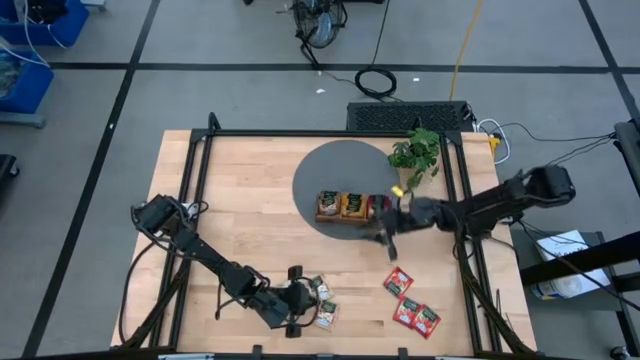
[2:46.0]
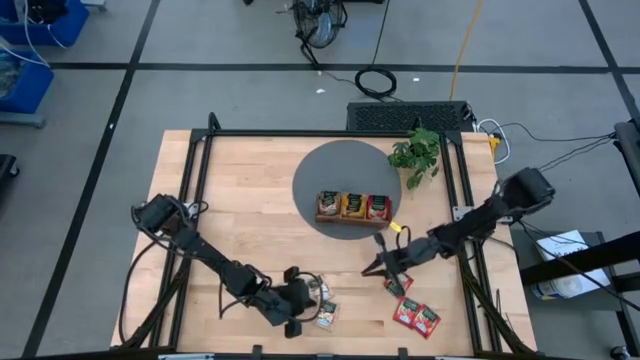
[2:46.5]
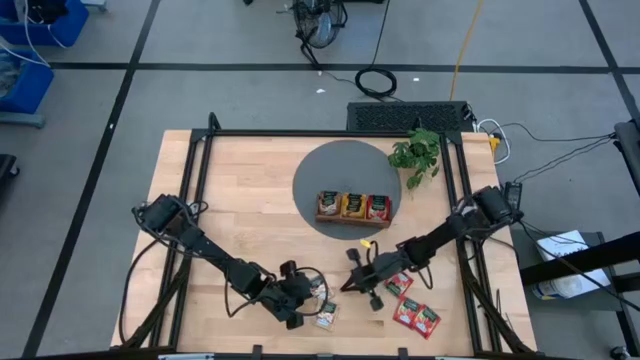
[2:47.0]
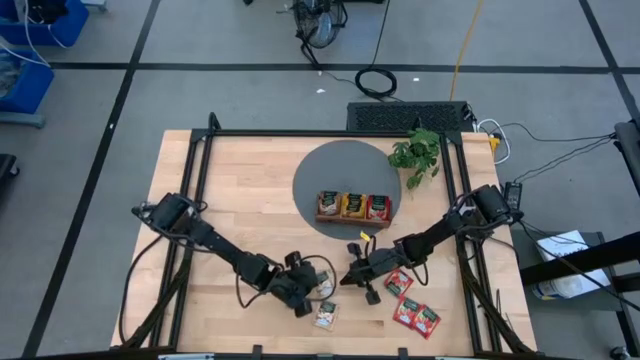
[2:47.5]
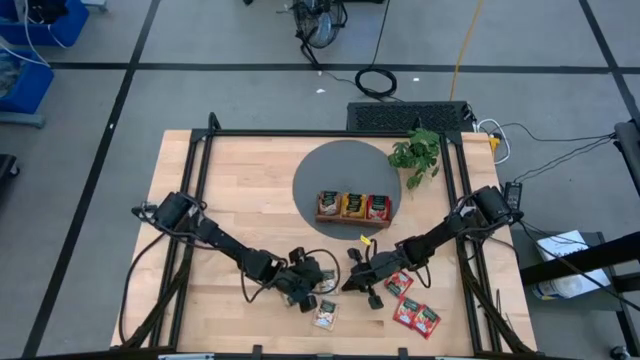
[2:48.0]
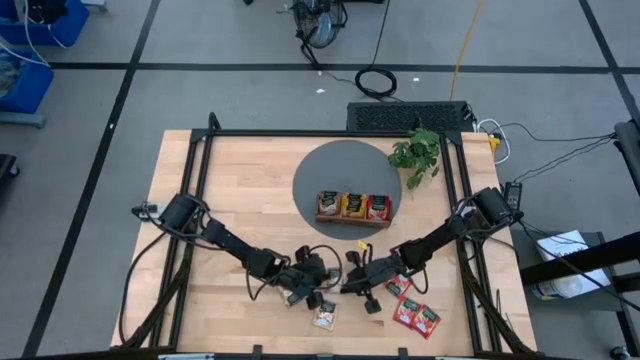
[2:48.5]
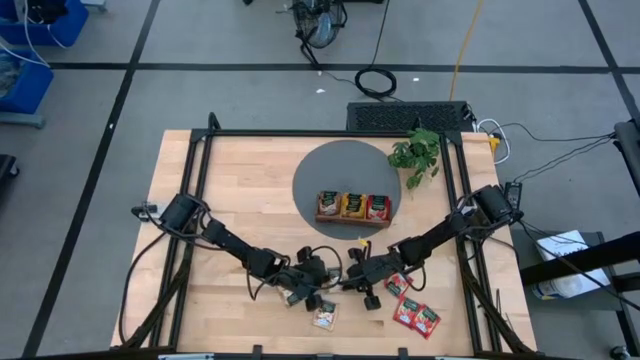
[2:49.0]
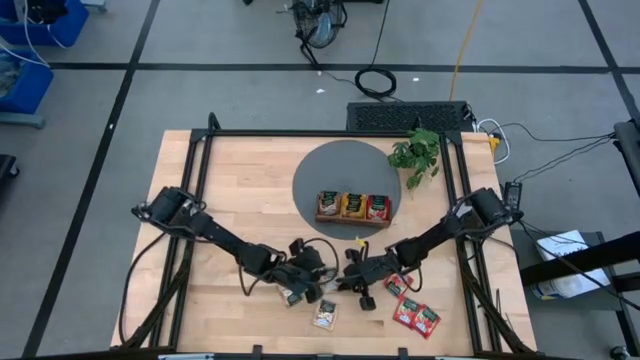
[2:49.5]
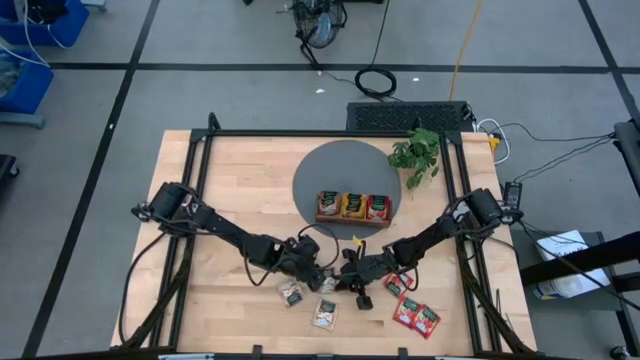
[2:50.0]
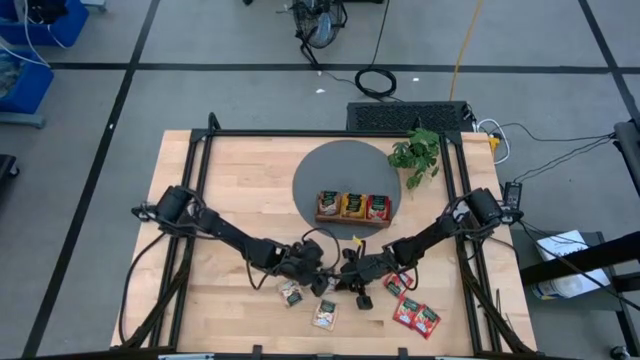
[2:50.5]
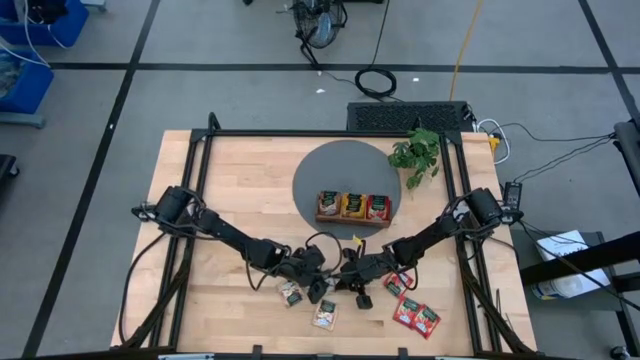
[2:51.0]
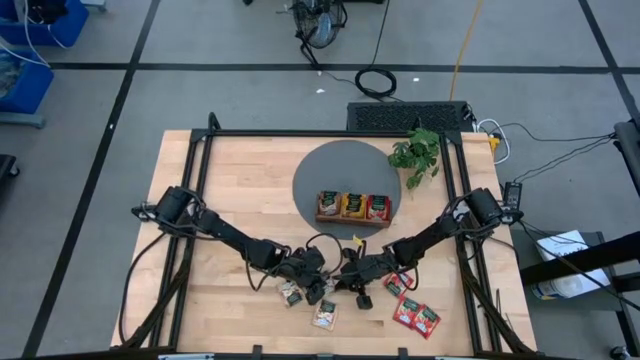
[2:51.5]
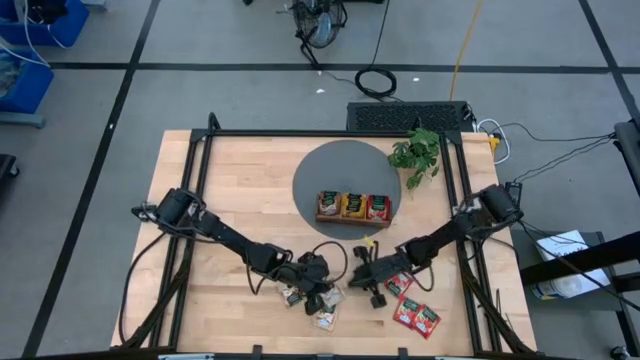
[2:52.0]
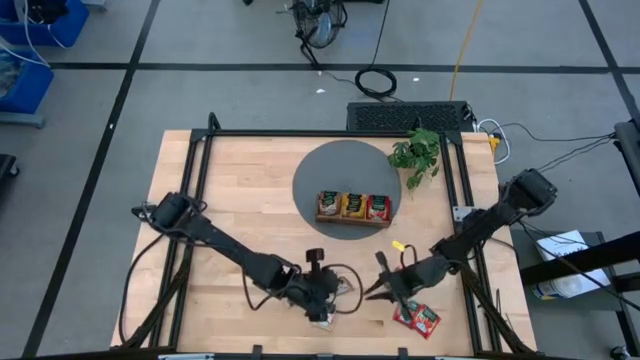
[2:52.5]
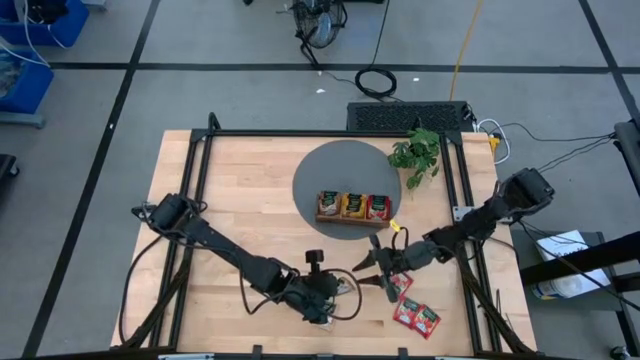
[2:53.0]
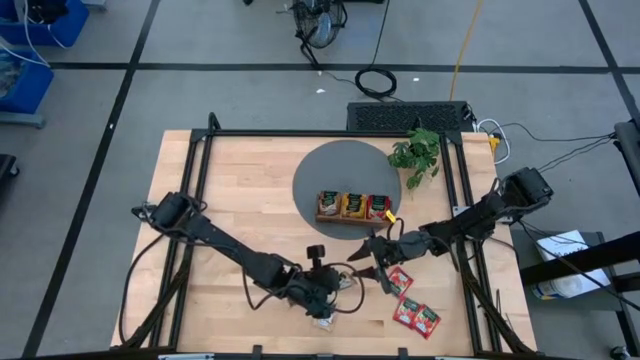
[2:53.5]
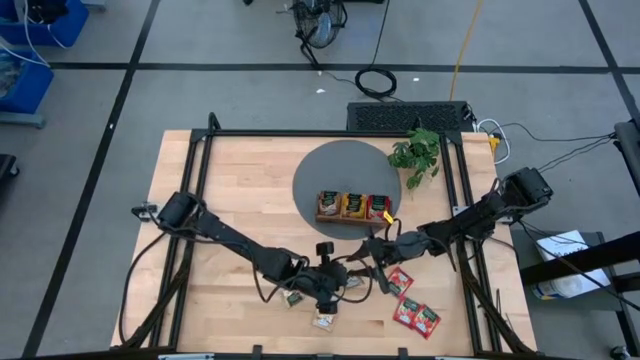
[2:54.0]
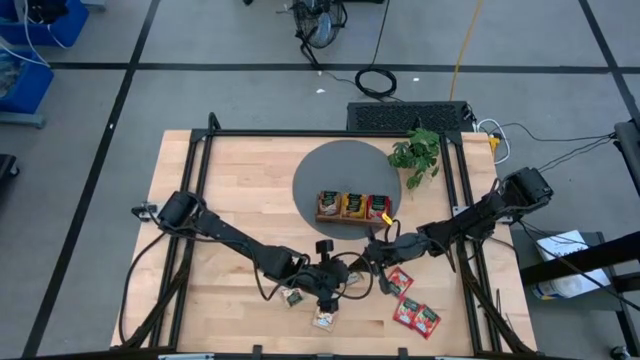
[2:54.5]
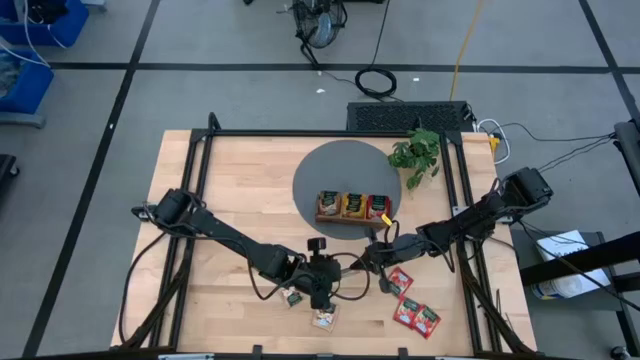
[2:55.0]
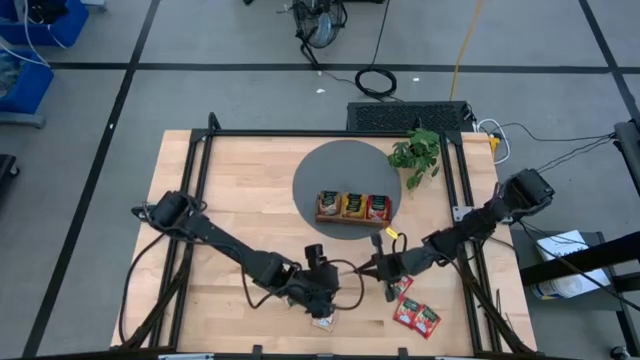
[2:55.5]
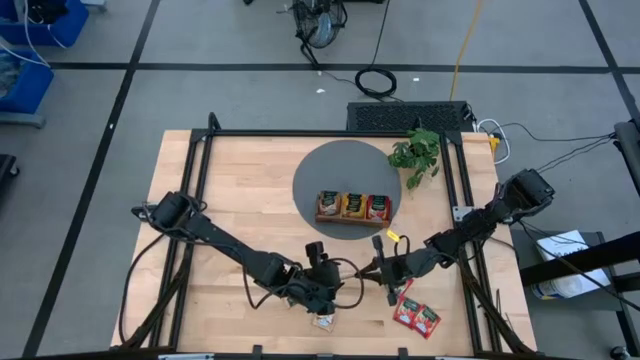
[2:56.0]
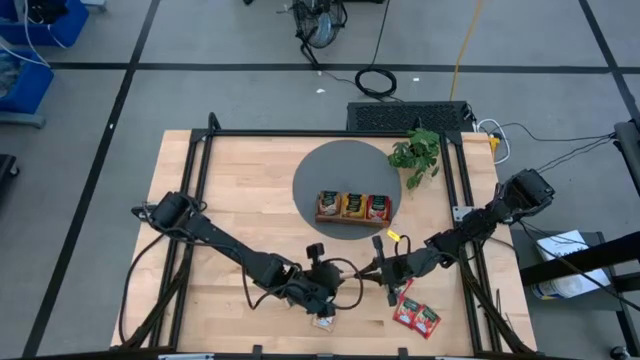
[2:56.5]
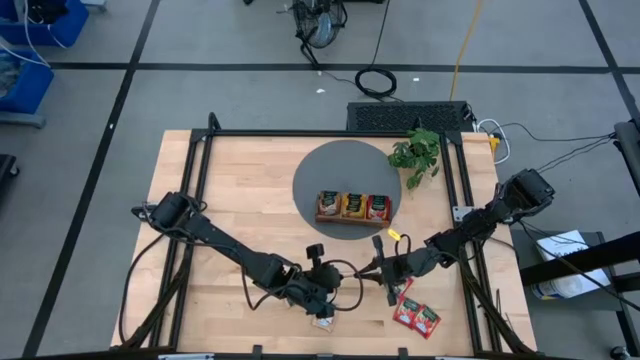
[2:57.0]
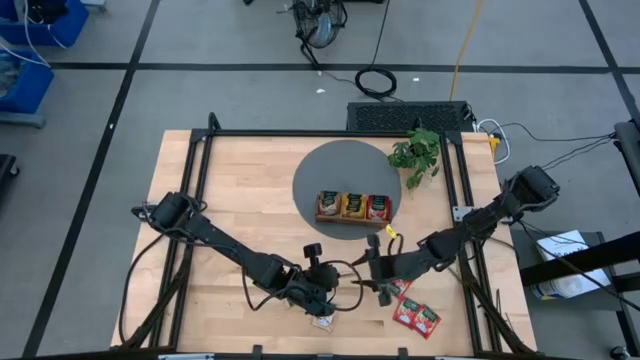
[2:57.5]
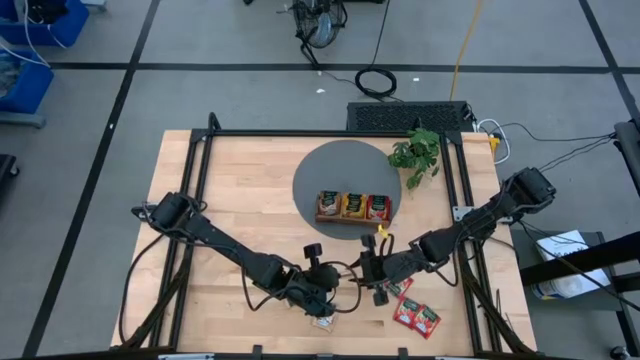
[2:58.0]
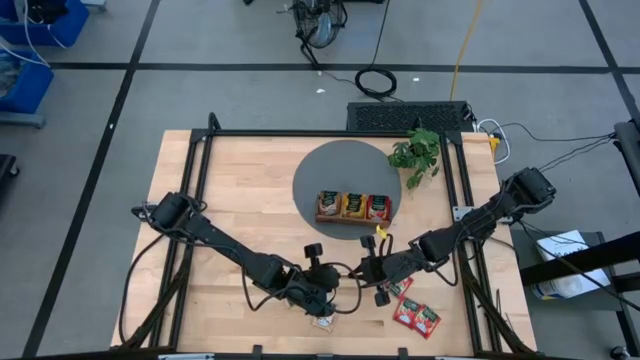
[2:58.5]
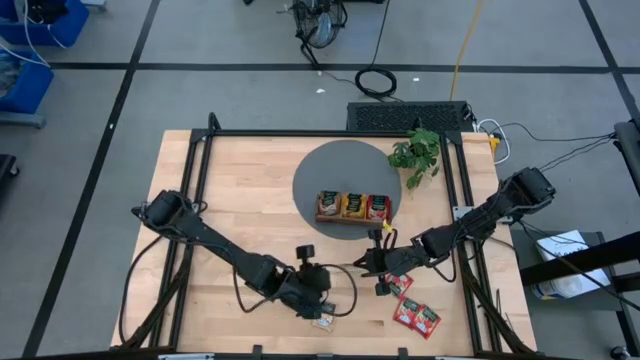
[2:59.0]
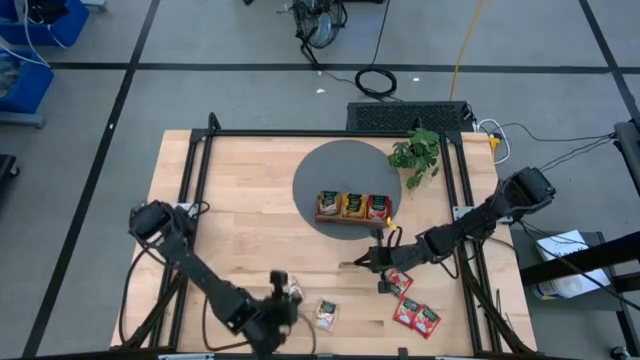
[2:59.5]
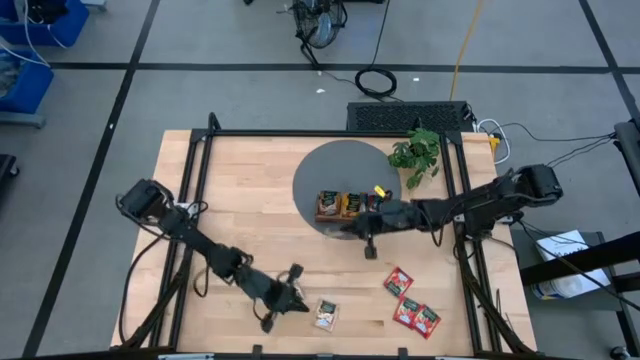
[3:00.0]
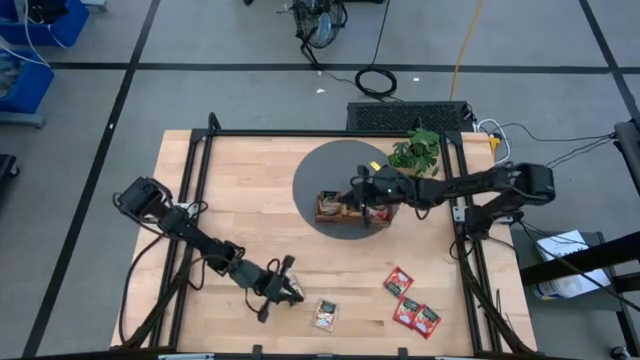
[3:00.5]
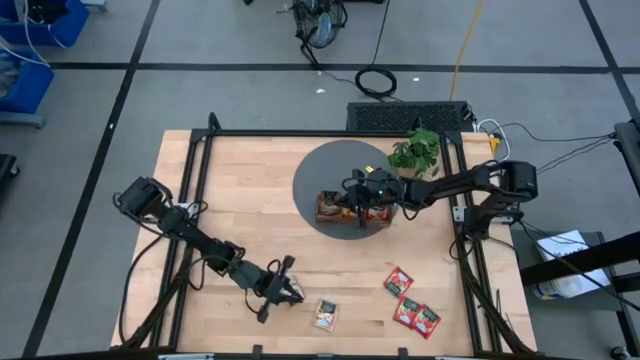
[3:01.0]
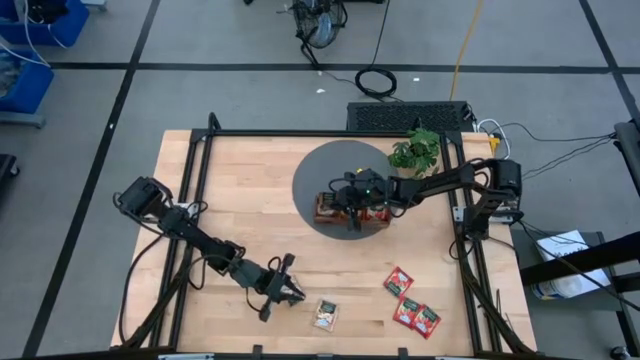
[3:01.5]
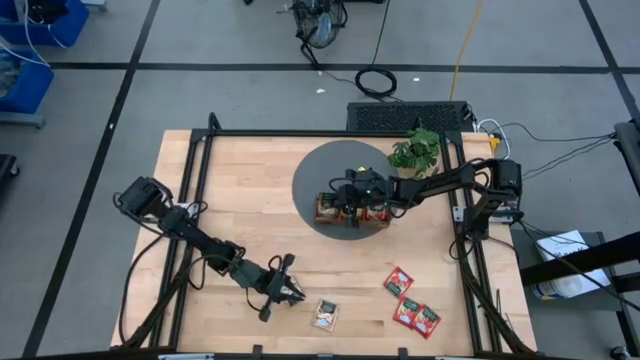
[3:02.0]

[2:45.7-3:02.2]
Task: Pick & Place Tea
Put the brown tea bag into the left section of the wooden organiser

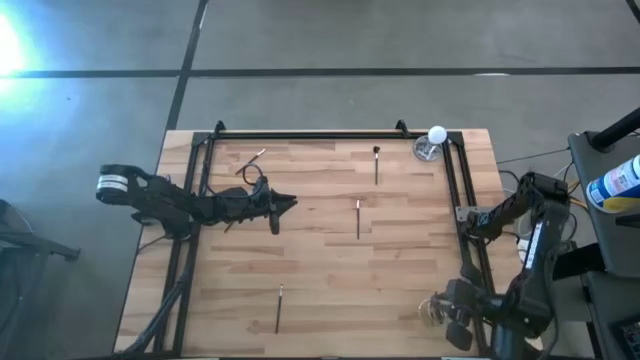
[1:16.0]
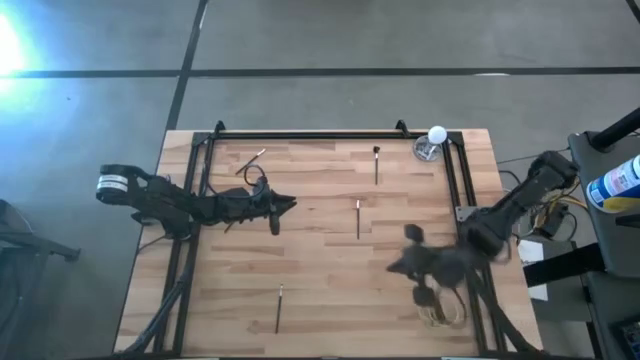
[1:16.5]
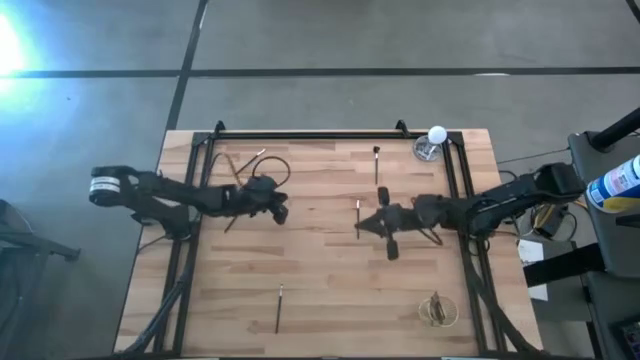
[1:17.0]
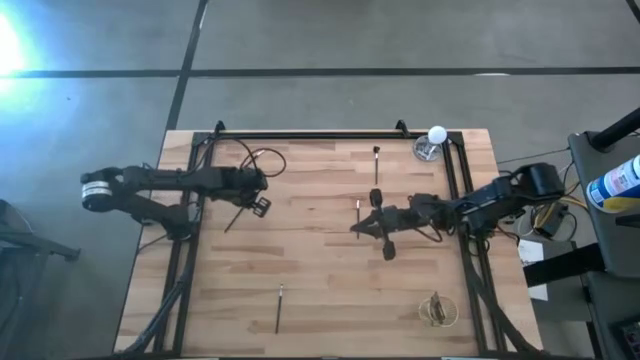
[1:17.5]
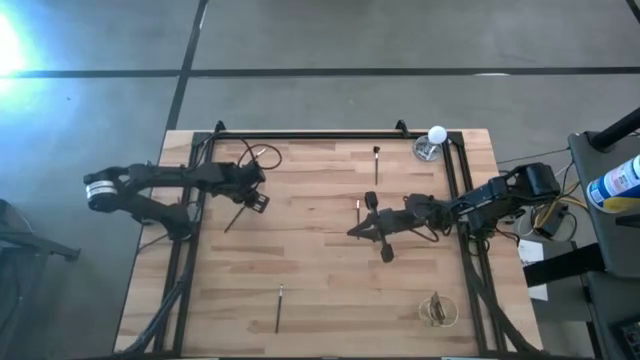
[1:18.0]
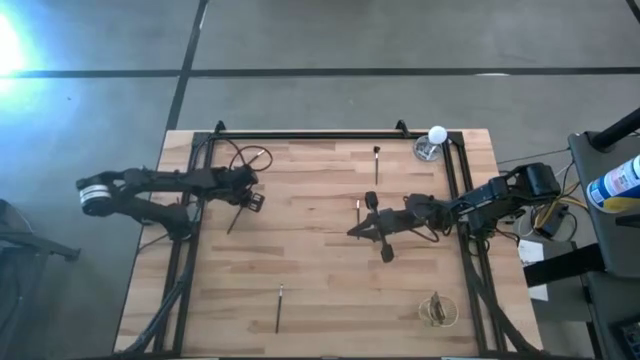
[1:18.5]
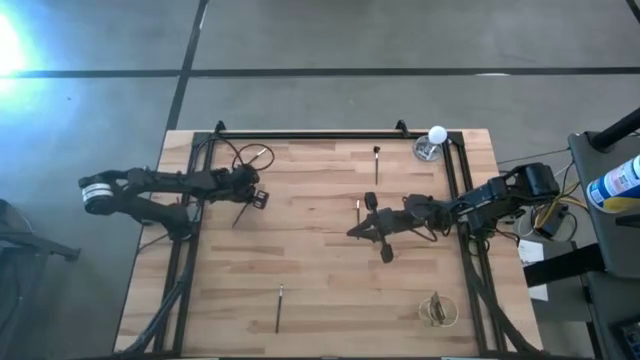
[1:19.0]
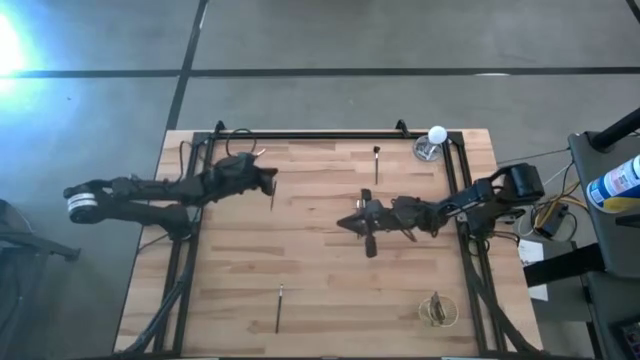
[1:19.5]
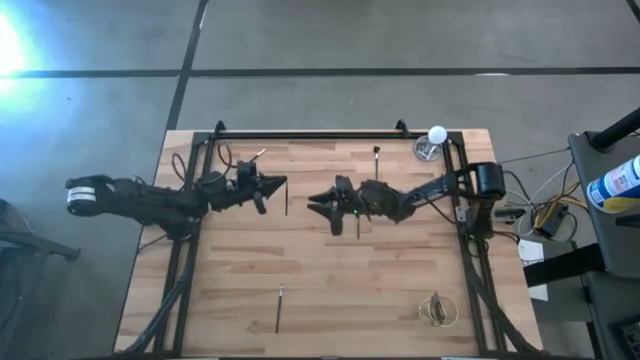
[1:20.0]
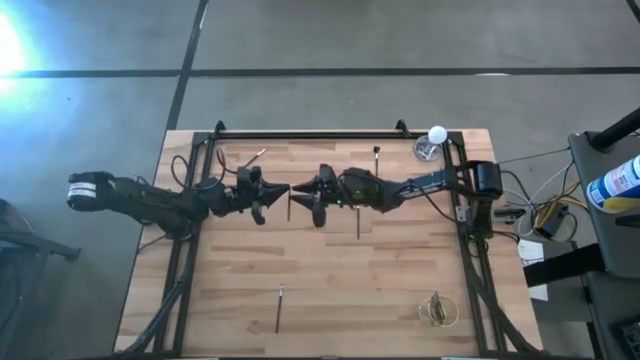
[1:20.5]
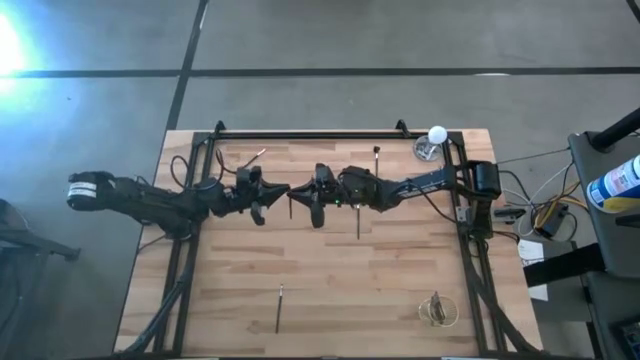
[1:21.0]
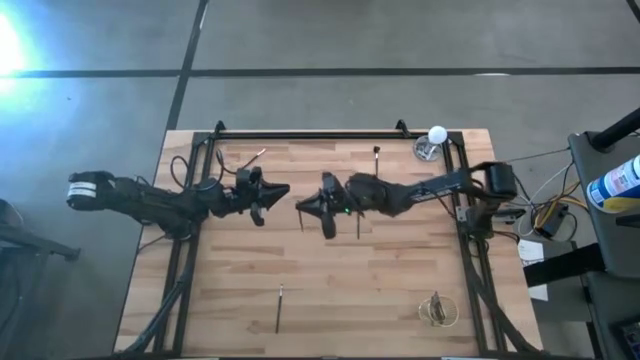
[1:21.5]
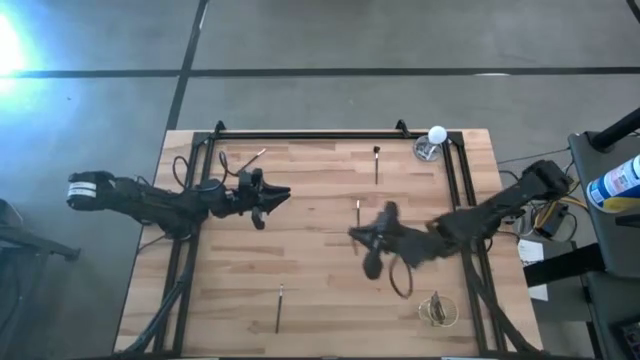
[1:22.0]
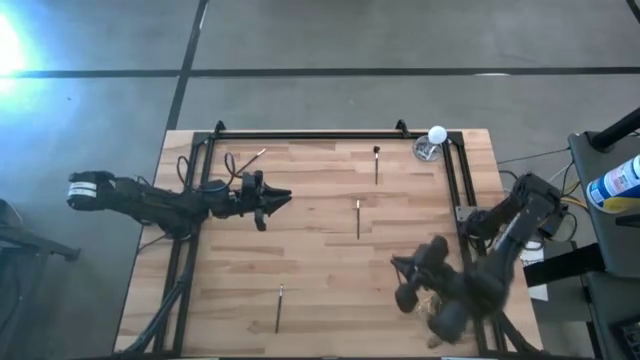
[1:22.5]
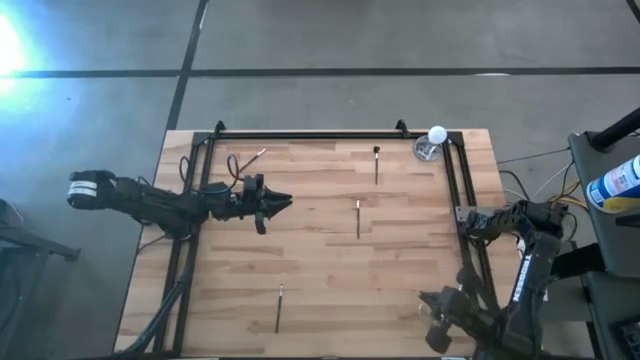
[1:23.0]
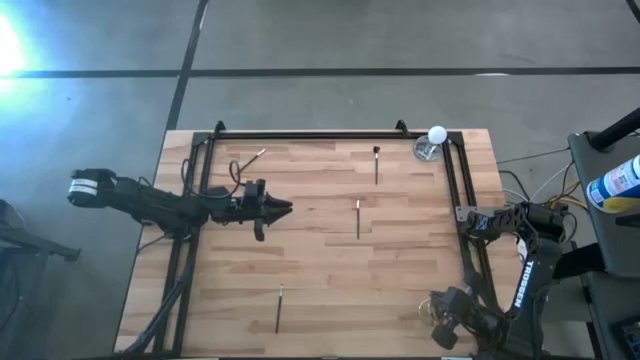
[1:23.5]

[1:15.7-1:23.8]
Task: Pick & Place Makeup Brushes
Put the eyeshadow brush into the makeup brush holder
